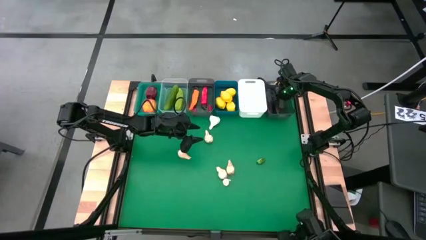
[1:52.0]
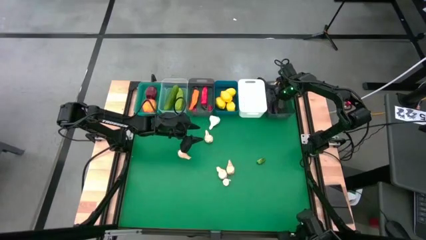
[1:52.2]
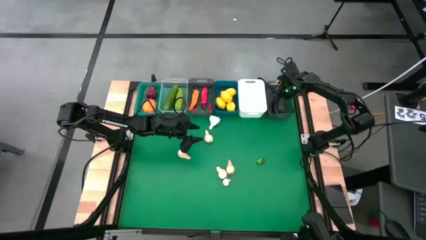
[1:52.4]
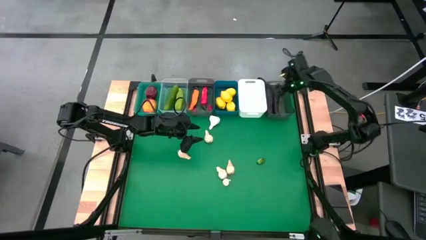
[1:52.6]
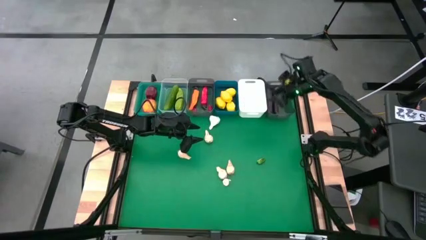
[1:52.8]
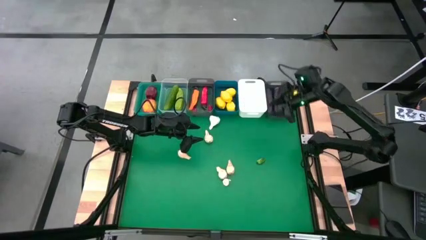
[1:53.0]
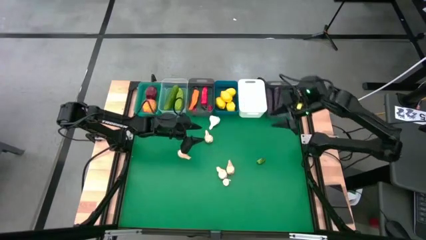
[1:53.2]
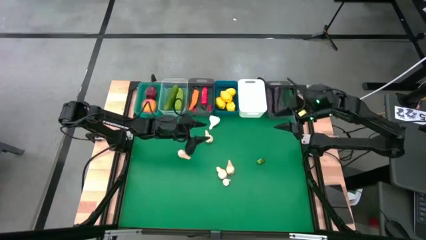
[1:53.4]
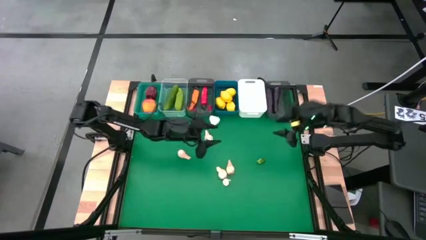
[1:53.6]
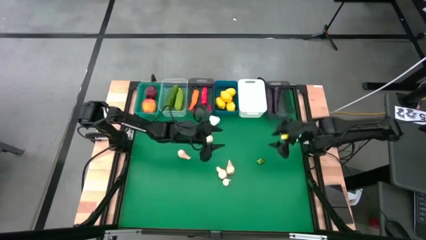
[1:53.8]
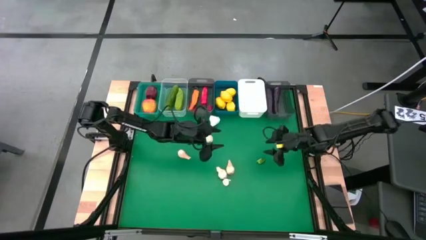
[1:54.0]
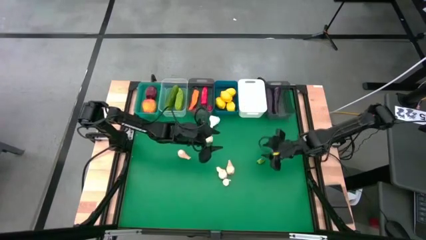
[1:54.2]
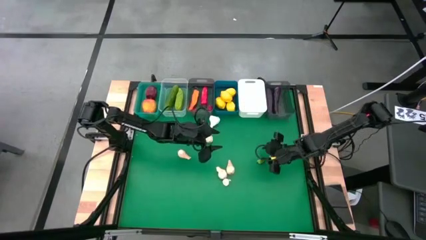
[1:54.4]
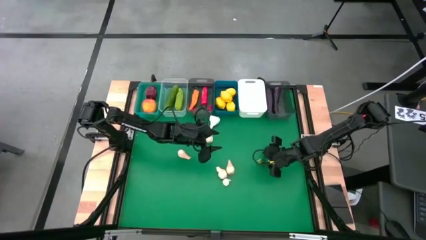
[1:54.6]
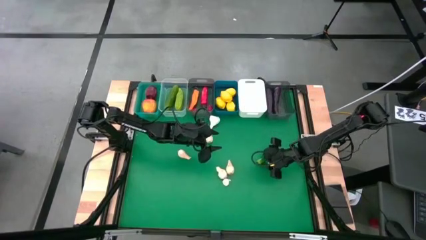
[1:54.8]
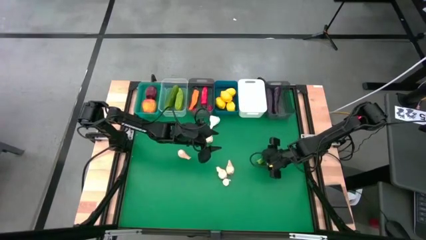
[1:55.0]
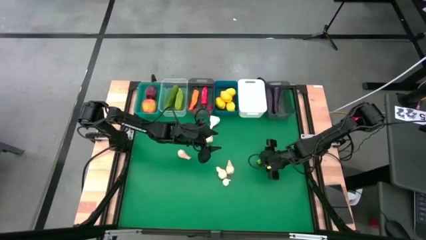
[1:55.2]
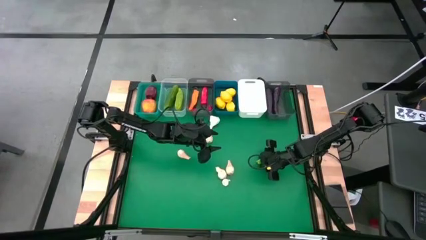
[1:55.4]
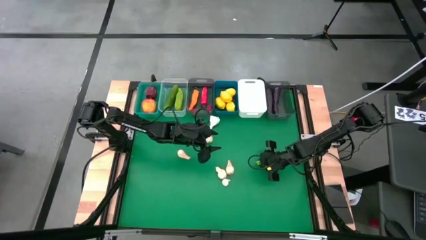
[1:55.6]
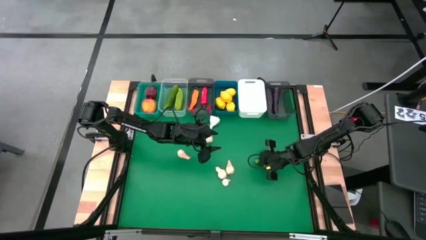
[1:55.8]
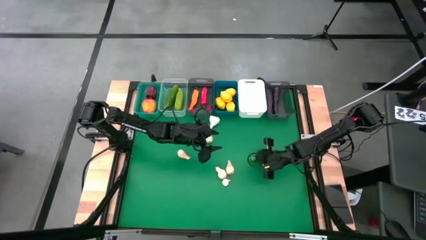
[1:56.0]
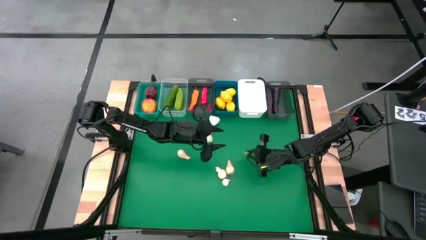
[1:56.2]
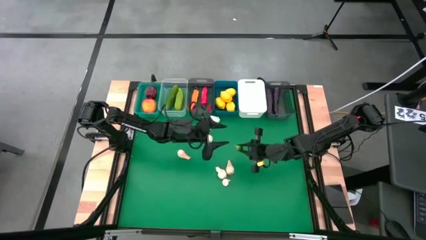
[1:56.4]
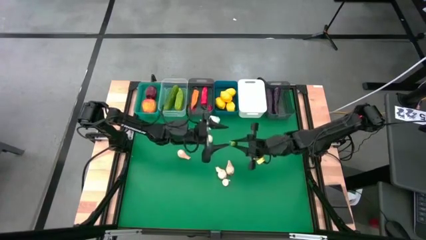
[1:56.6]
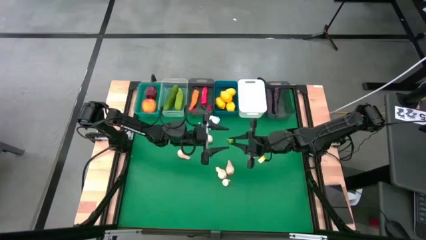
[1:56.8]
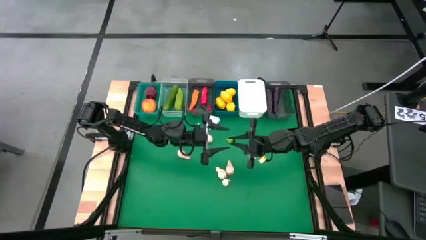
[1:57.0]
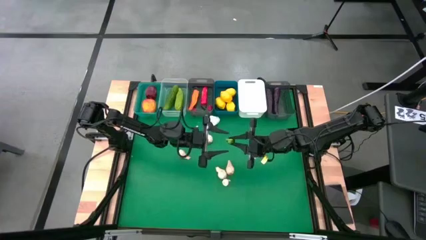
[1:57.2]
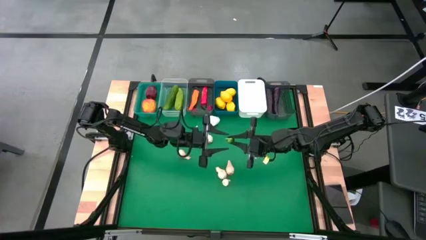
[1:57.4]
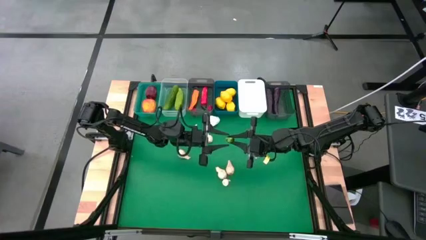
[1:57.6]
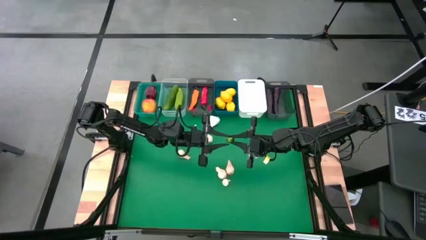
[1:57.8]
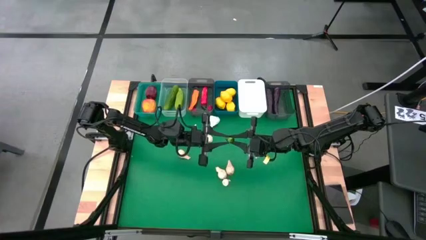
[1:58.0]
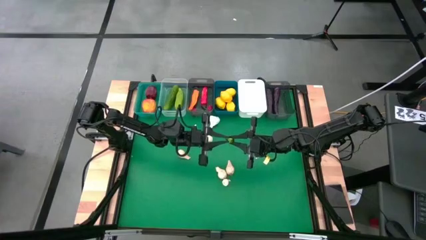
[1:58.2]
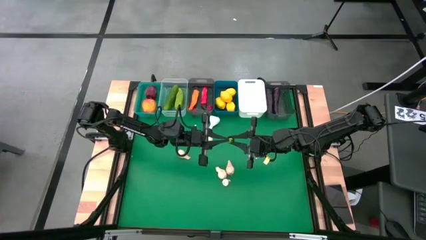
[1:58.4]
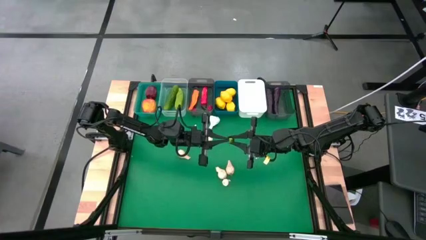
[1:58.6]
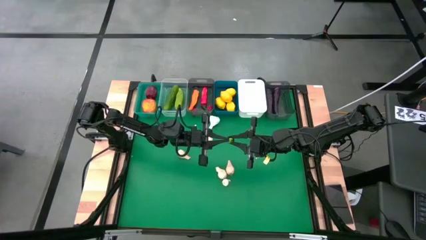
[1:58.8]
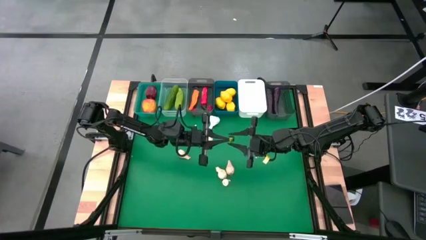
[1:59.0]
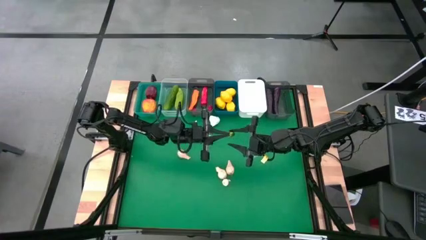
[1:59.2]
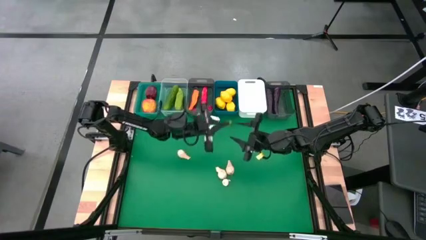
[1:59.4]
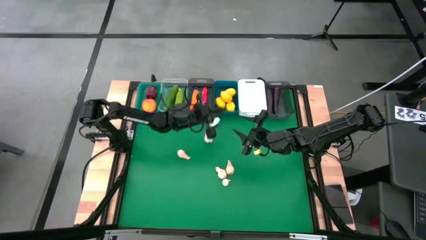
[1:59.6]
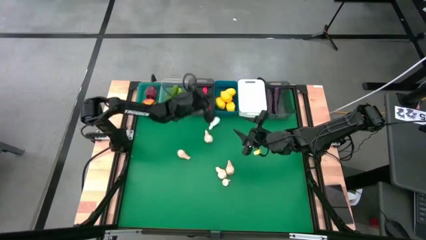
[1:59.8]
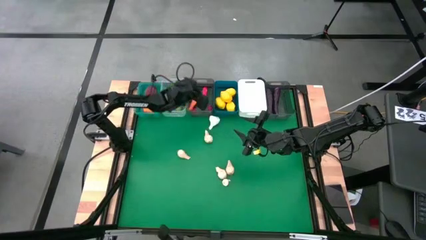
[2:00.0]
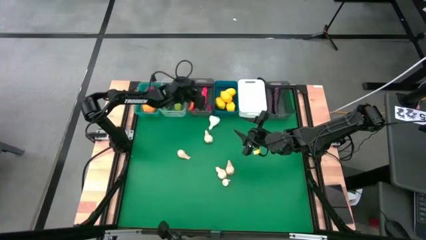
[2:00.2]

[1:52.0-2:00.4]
Task: Sort produce into baskets
Put the green chili pepper into the left black bin

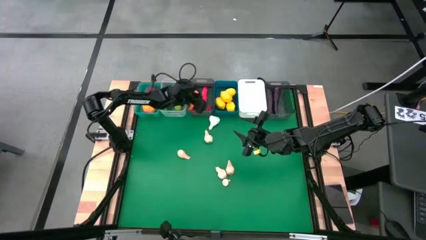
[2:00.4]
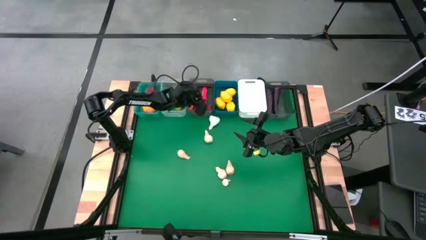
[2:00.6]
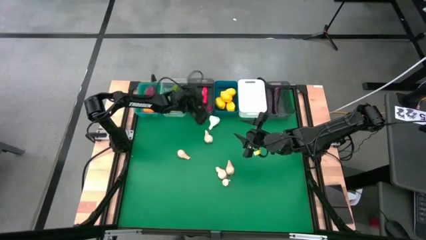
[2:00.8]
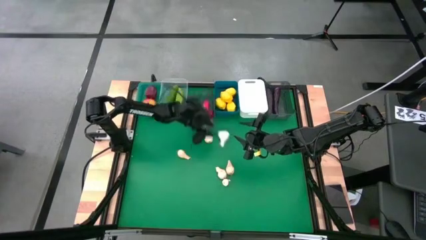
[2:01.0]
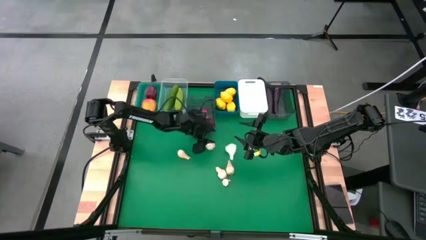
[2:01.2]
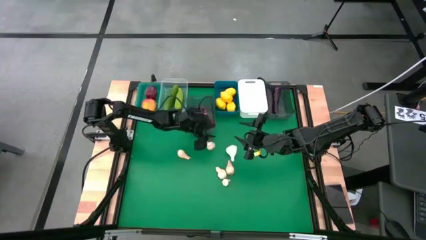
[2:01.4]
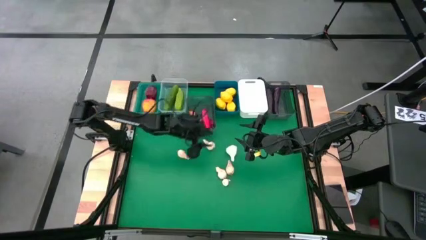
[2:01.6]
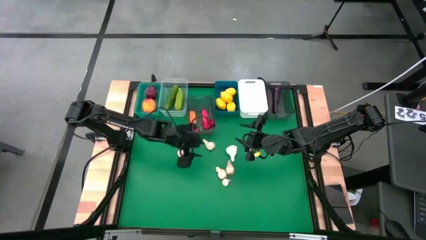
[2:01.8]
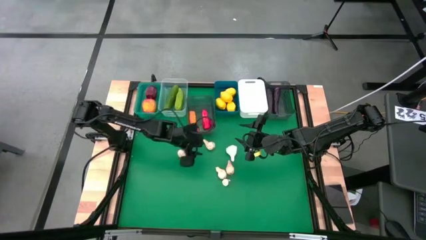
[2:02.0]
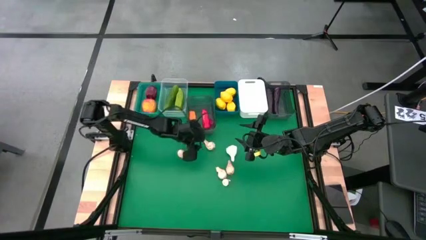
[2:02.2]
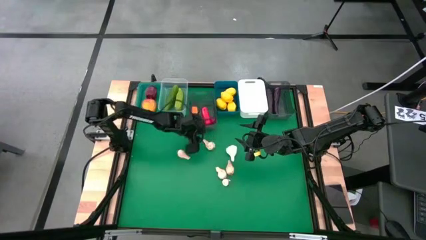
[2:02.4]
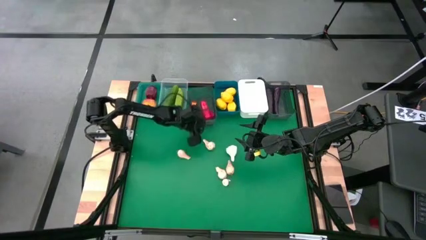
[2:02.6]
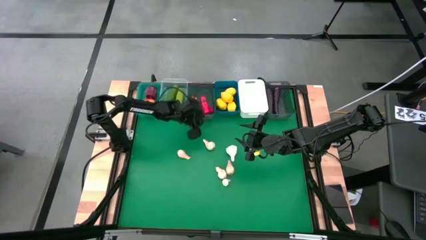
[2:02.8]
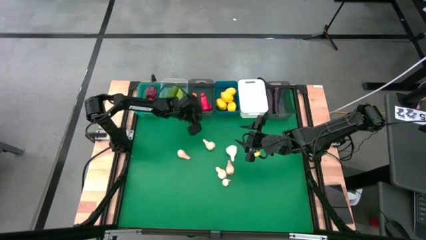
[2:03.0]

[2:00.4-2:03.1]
Adjust the left black bin

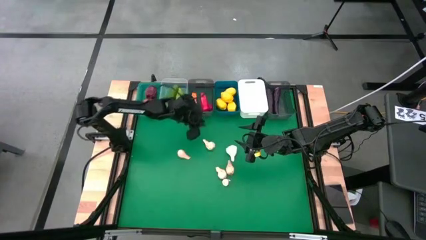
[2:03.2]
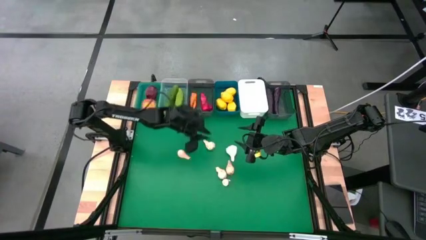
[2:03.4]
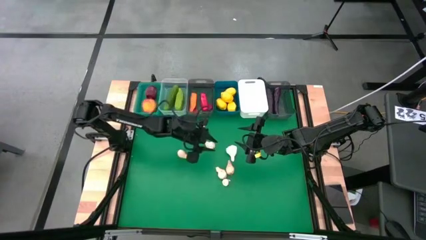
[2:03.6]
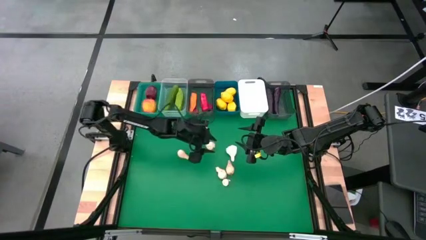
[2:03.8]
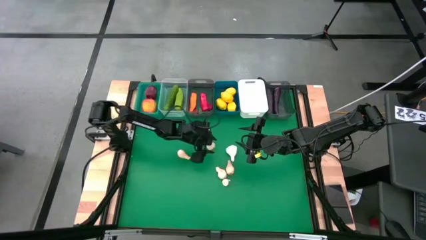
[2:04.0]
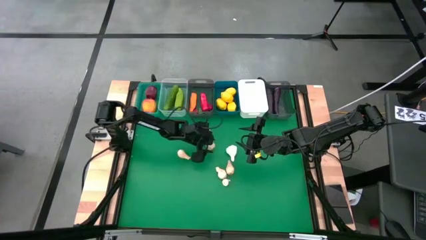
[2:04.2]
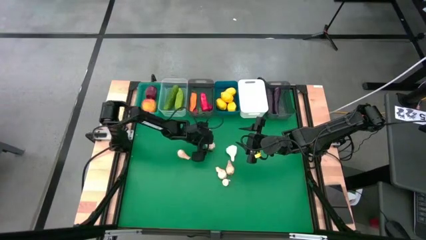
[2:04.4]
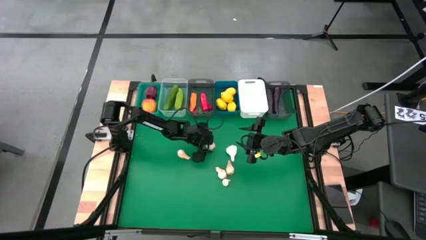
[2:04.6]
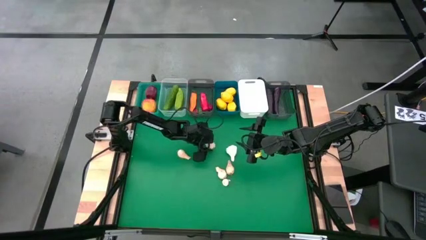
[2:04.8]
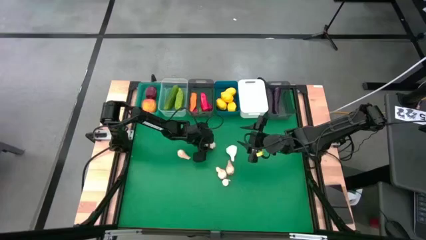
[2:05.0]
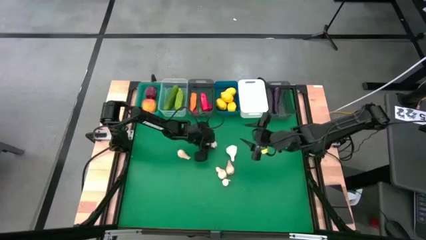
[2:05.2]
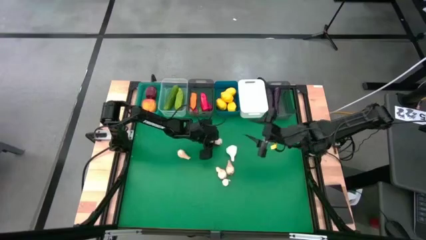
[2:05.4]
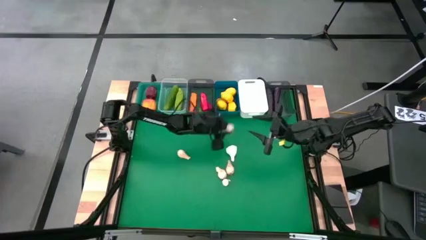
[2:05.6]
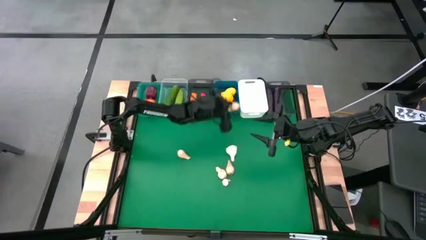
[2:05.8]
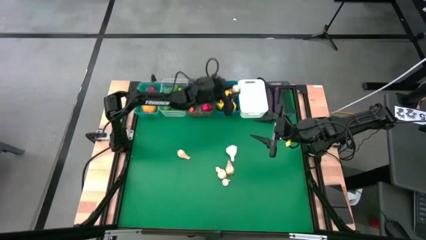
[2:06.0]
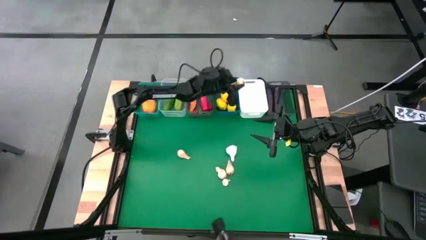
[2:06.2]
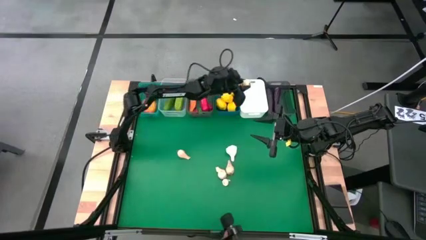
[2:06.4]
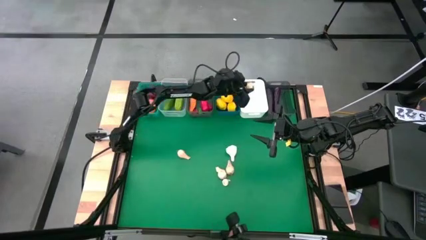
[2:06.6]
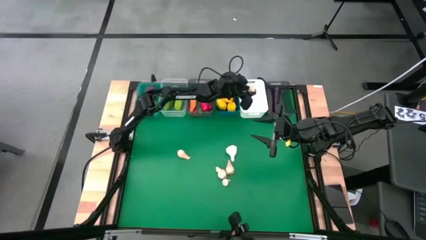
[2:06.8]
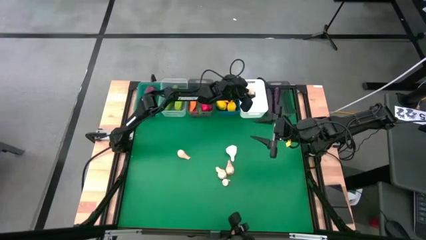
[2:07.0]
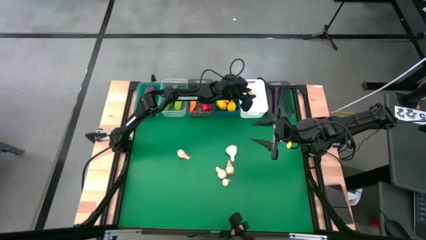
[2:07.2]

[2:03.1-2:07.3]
Put the garlic into the white bin
